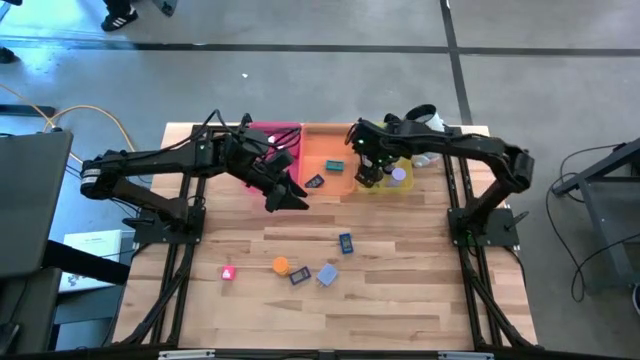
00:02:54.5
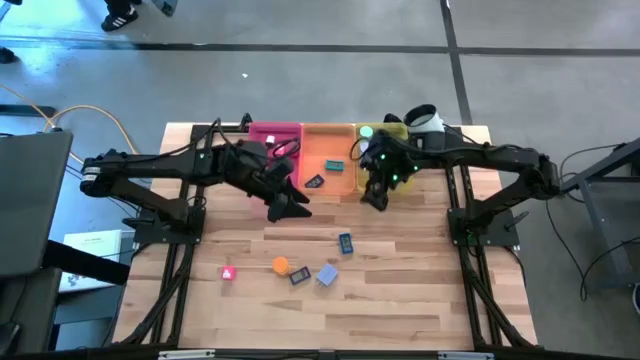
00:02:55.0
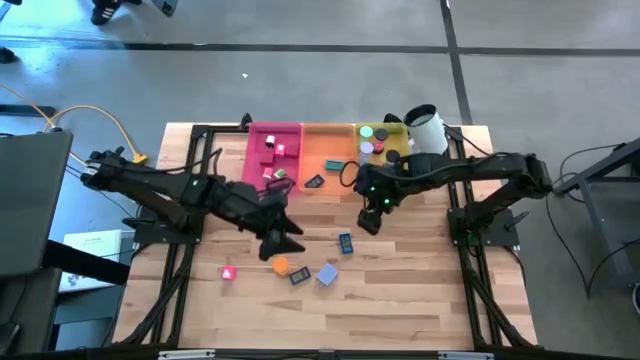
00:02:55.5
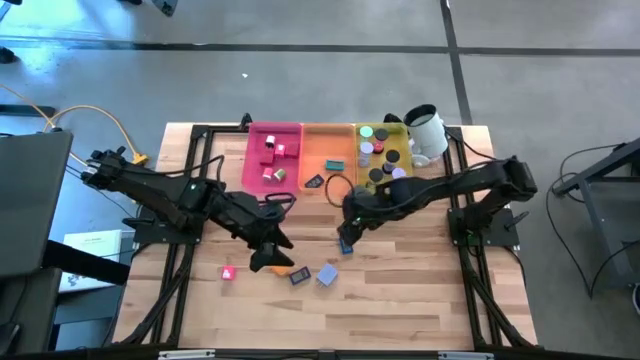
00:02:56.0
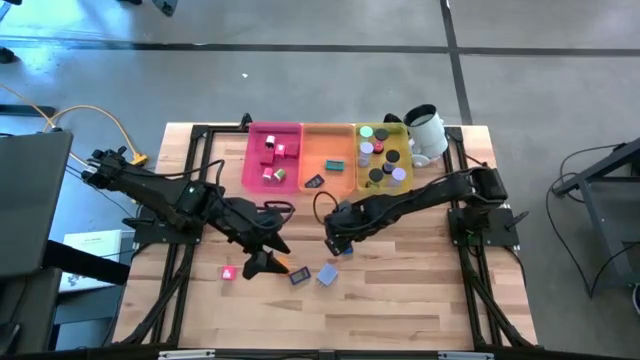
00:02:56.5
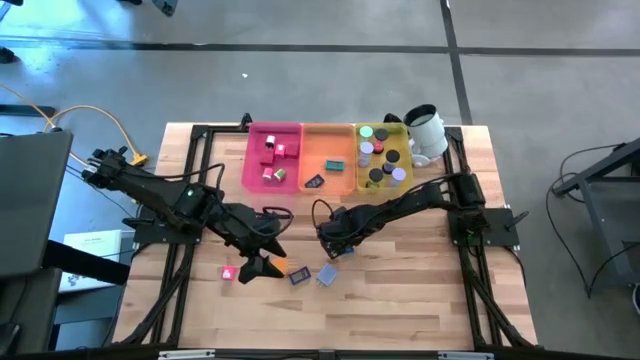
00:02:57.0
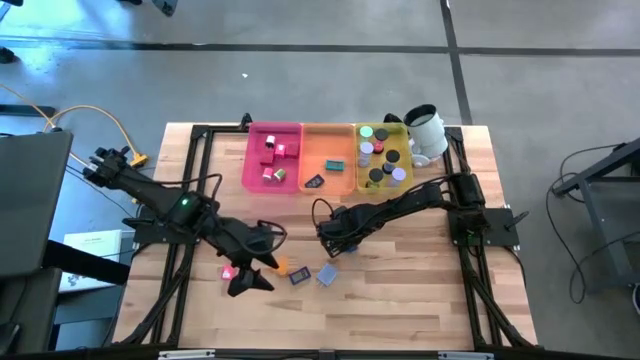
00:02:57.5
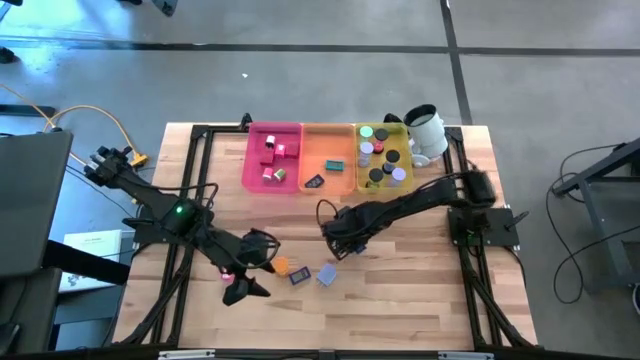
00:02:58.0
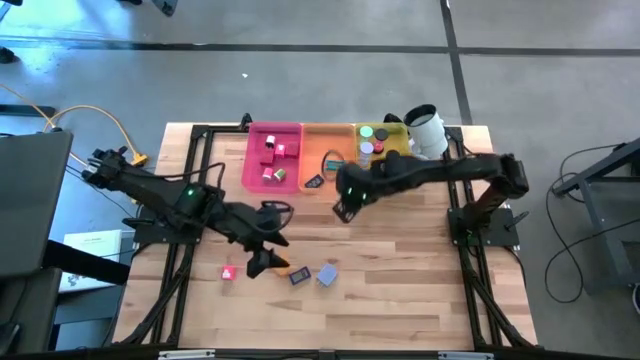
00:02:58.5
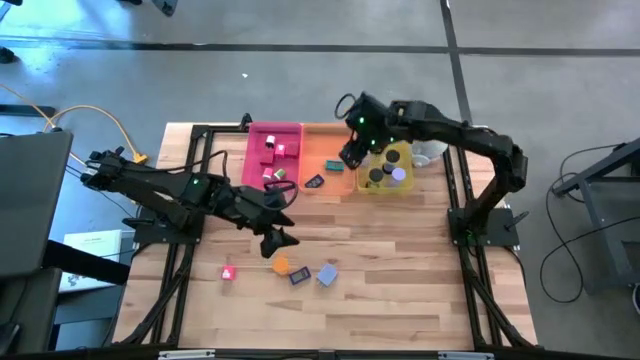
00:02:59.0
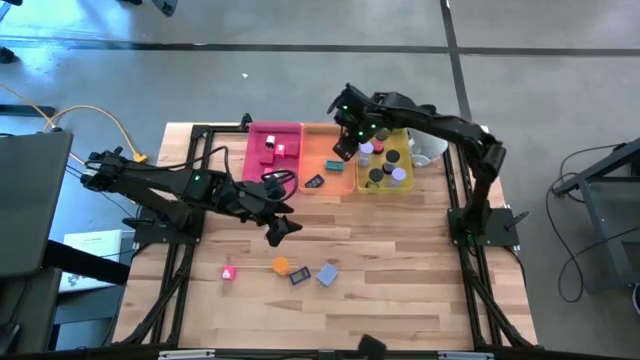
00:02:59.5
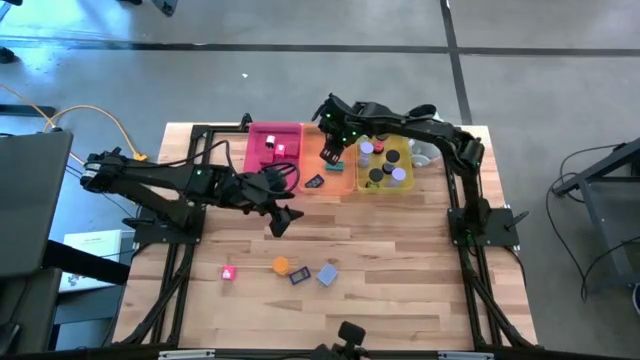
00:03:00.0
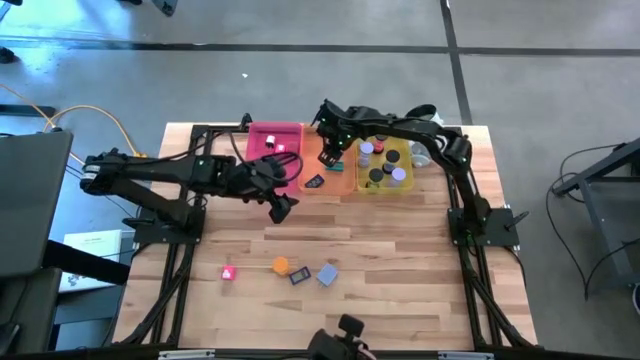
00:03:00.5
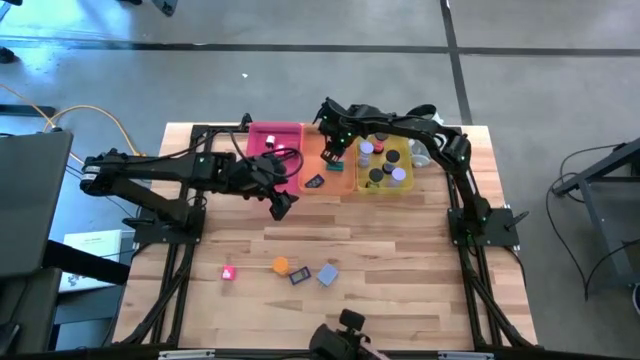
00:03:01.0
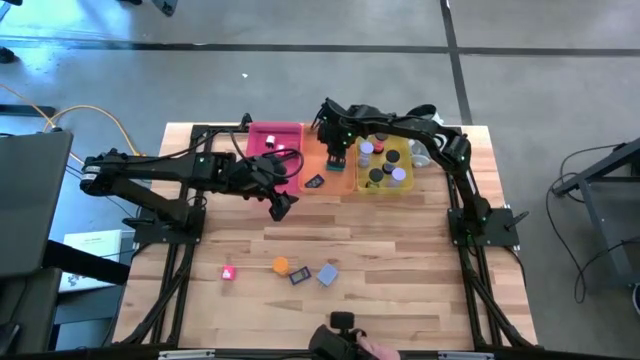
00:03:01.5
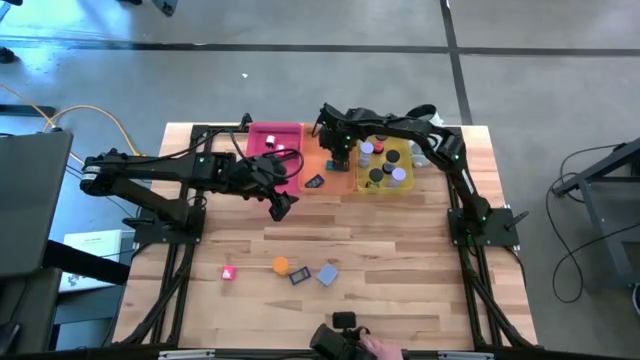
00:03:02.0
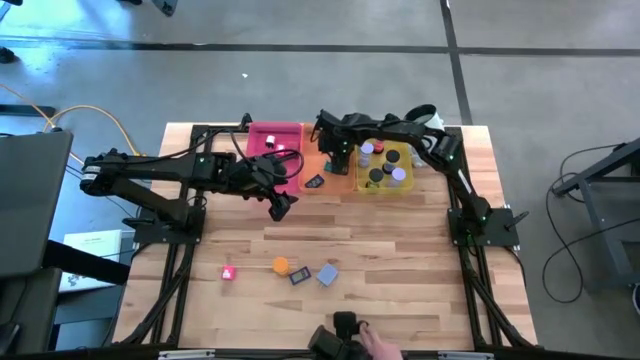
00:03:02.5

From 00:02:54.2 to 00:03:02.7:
Task: Pick & Place Office items
Put the blue digital clock into the orange bin

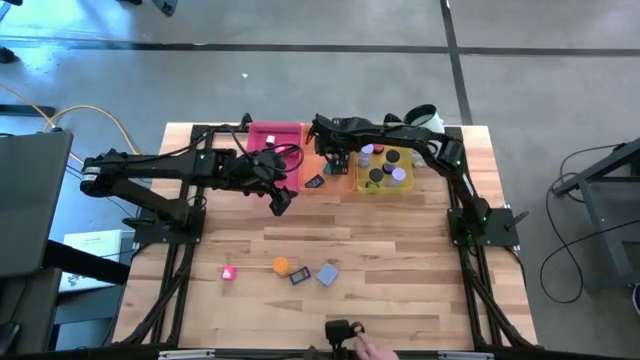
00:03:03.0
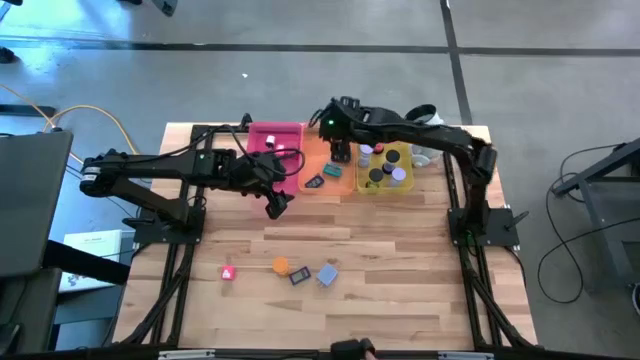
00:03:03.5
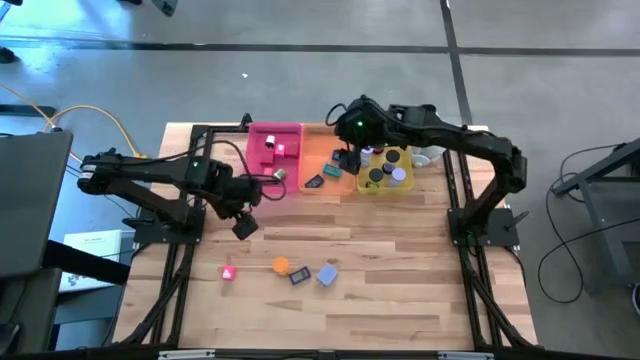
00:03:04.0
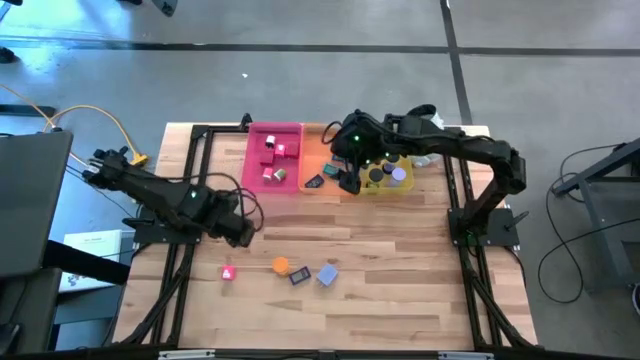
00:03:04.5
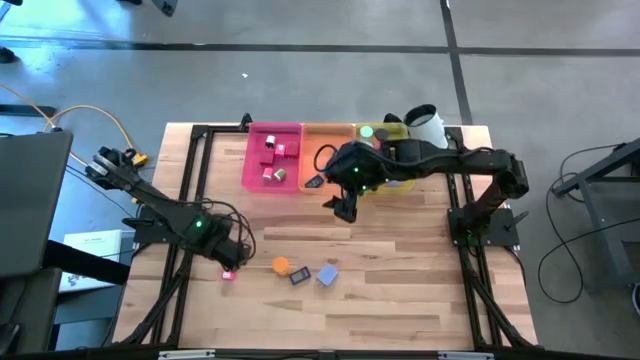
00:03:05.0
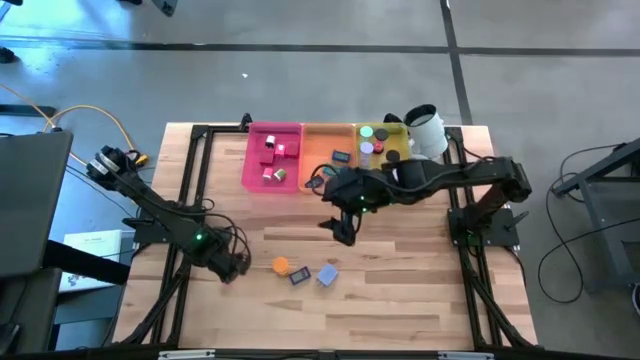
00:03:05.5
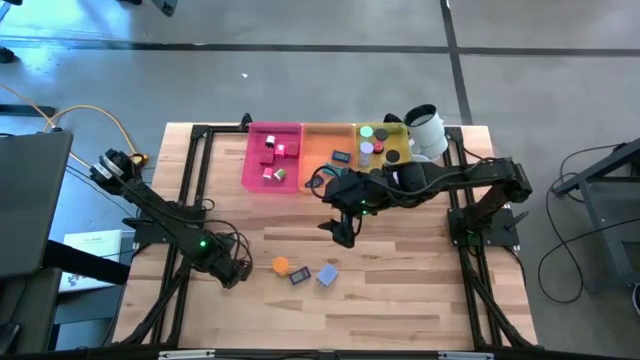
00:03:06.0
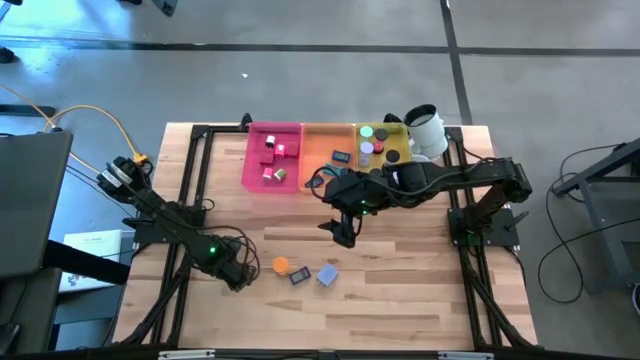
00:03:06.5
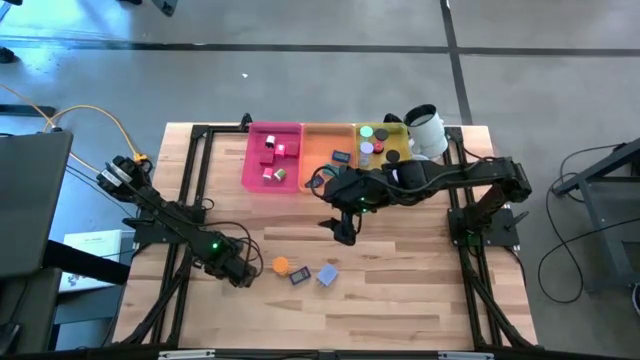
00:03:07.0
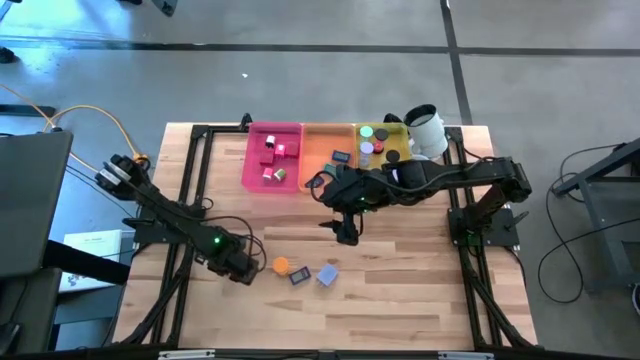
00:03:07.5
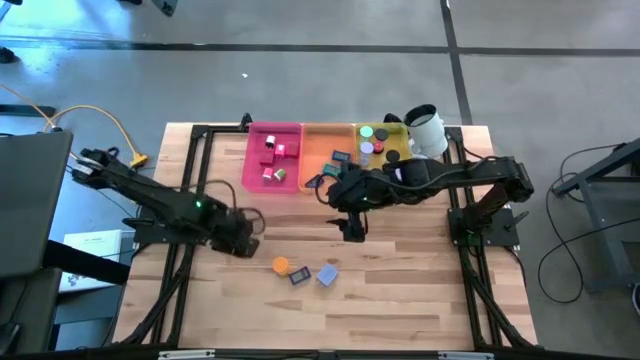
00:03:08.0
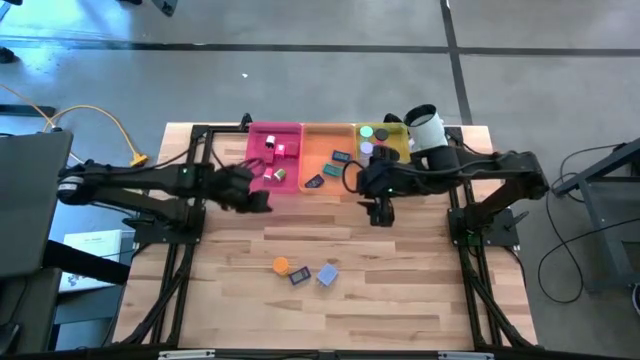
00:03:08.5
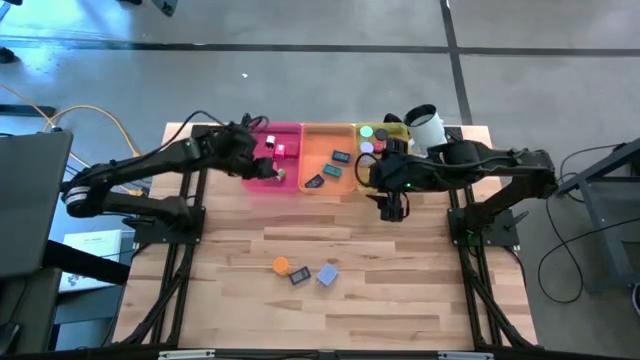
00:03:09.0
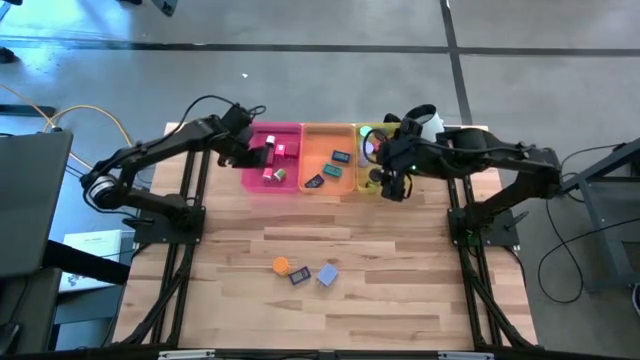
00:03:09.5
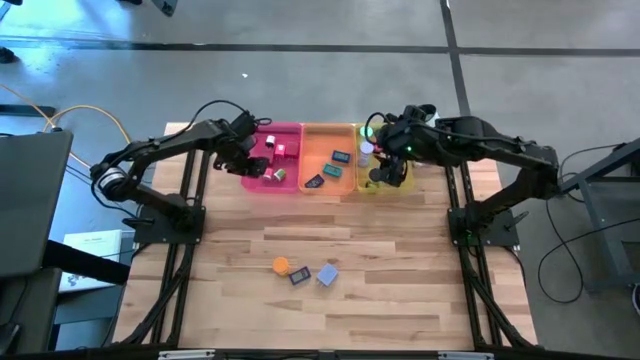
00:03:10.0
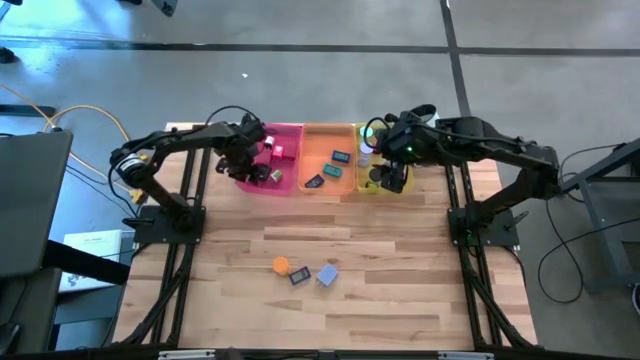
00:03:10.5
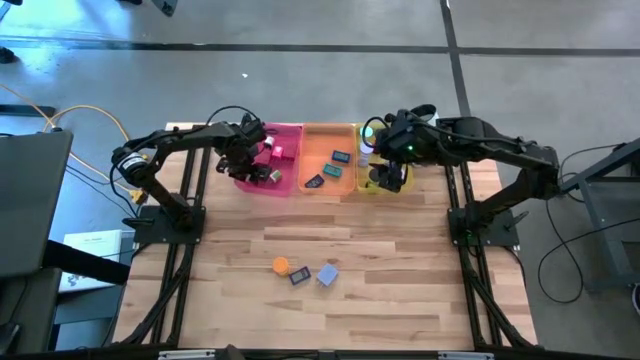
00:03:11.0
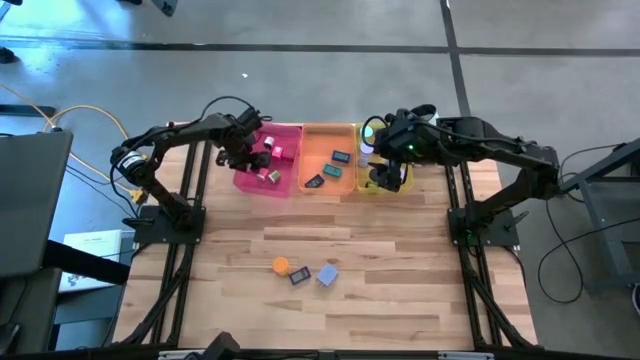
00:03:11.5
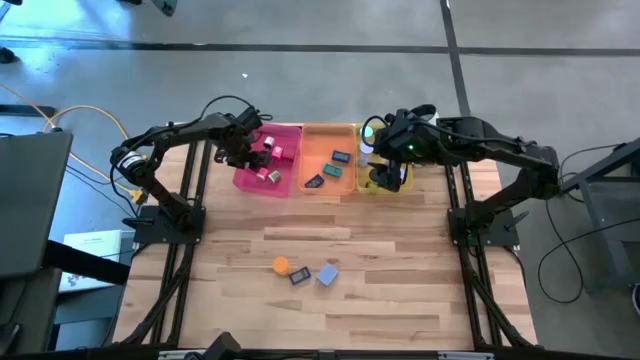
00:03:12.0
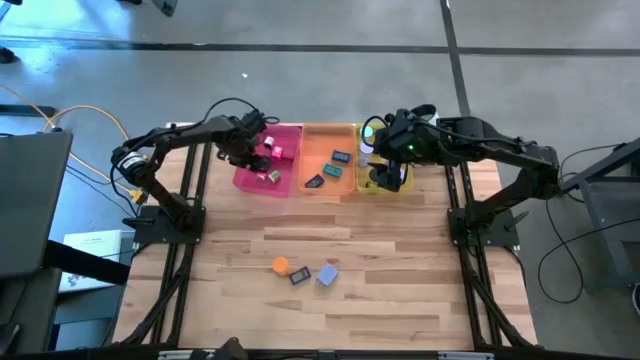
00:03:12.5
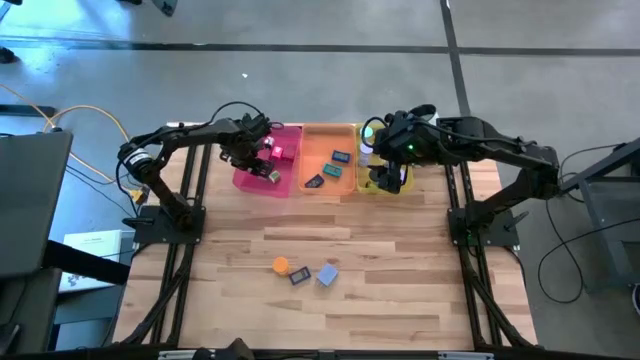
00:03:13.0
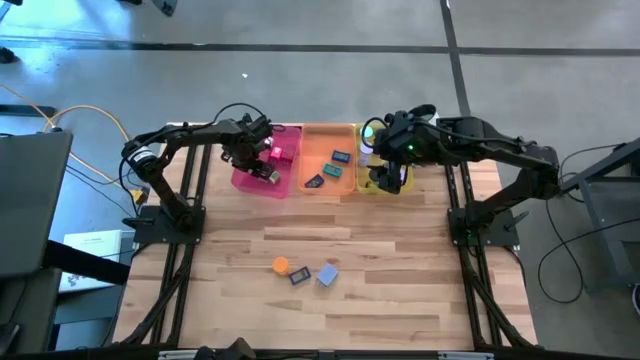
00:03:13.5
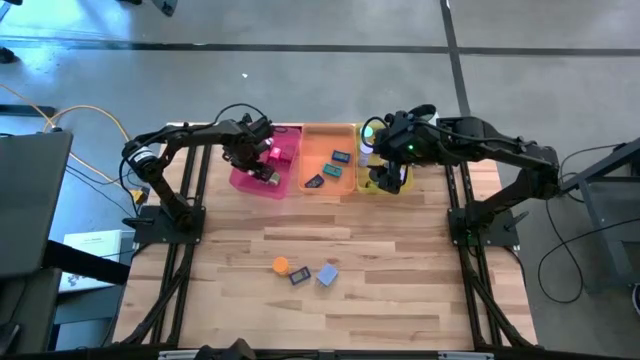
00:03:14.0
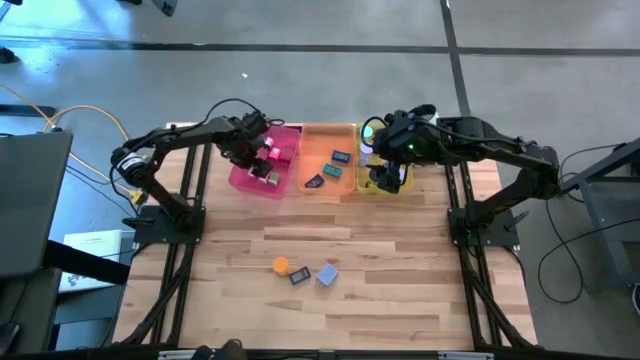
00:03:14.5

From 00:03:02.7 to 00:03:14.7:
Put the pink charger adapter into the pink bin

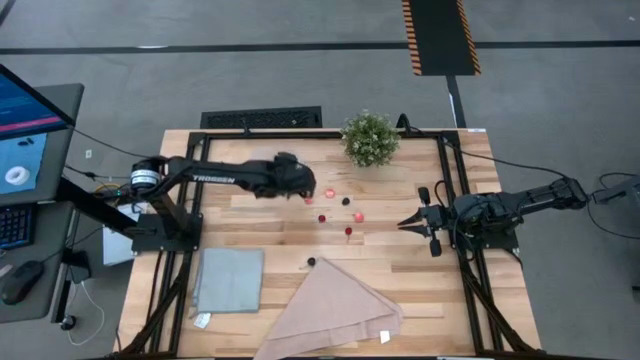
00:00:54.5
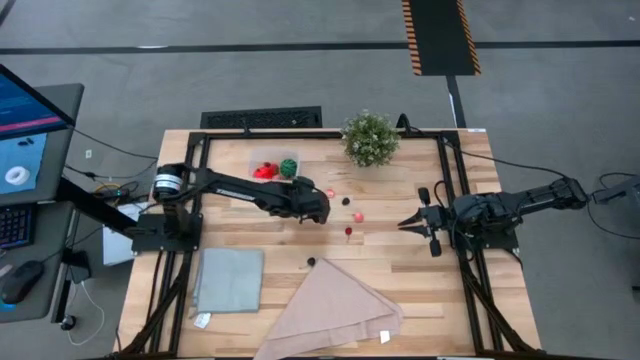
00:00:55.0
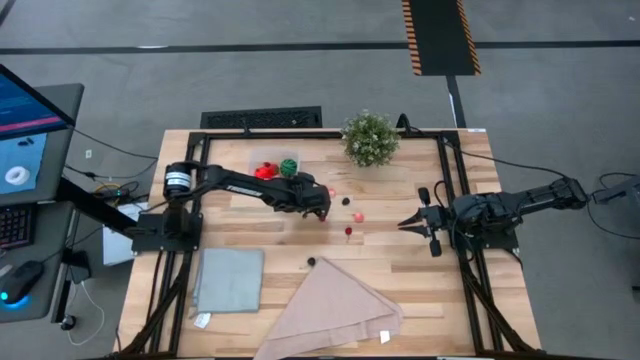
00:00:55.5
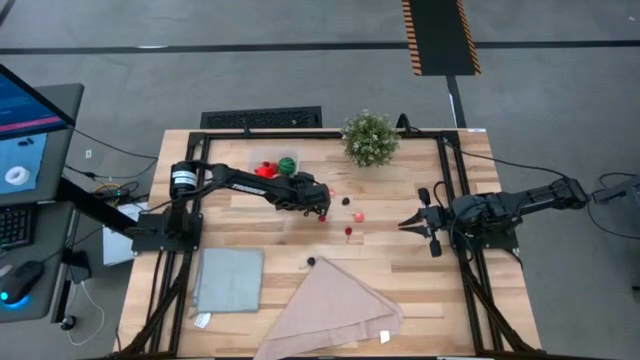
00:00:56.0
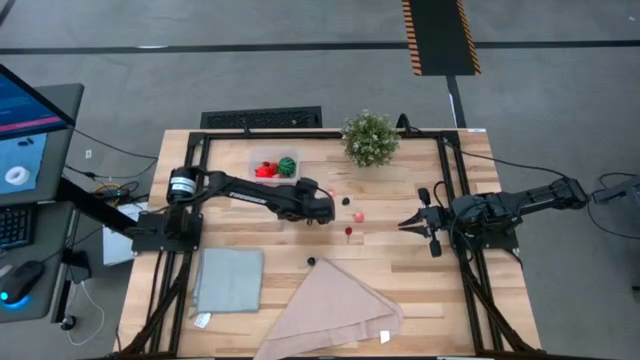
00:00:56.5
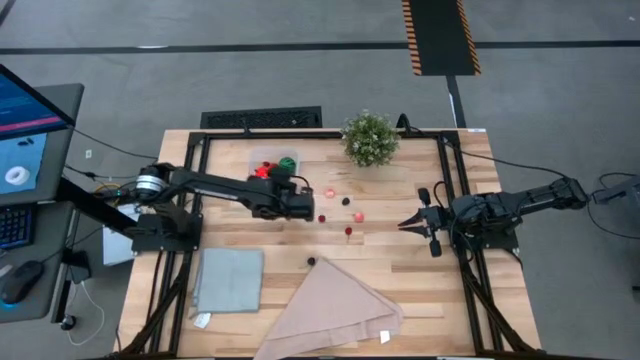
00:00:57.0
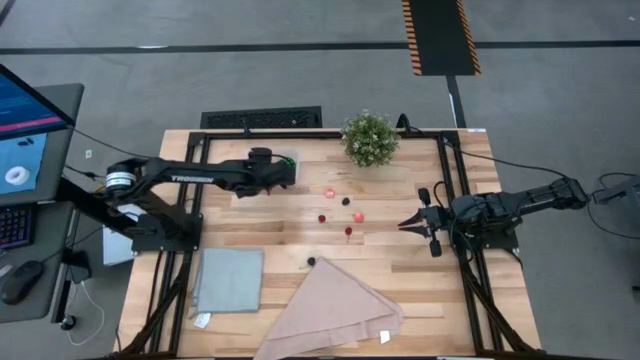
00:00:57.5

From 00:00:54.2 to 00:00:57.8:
Task: Pick and placing Produce into tupperware
Put the pink peach into the transparent container
